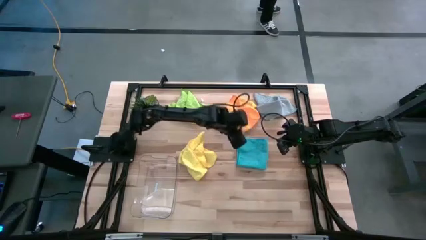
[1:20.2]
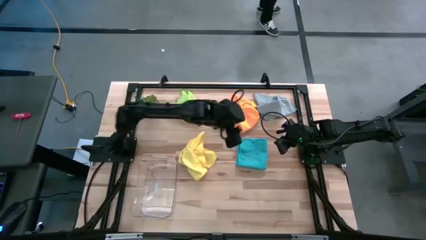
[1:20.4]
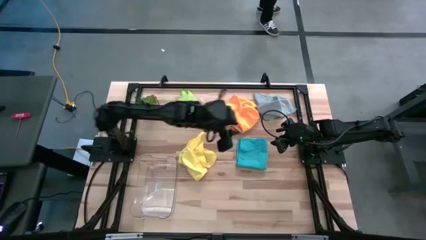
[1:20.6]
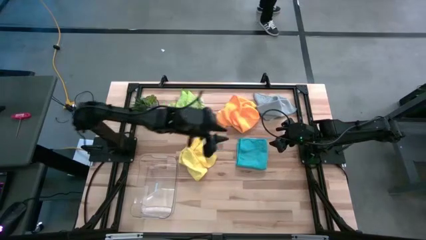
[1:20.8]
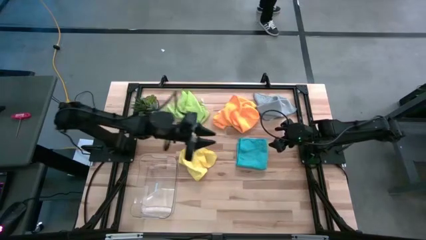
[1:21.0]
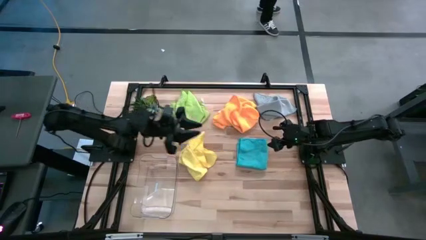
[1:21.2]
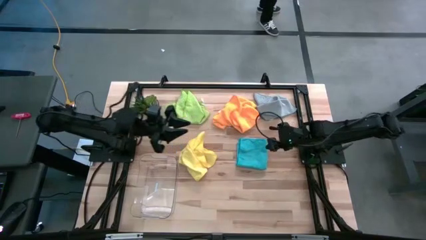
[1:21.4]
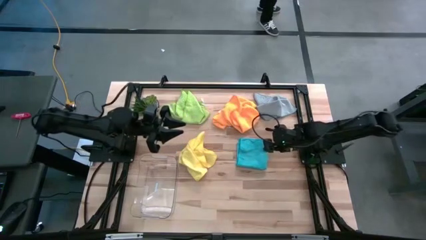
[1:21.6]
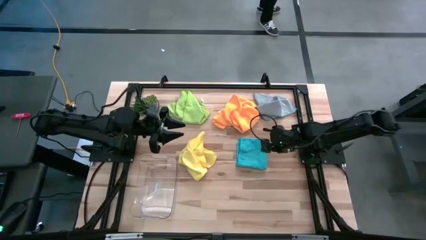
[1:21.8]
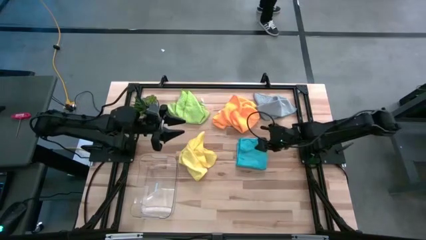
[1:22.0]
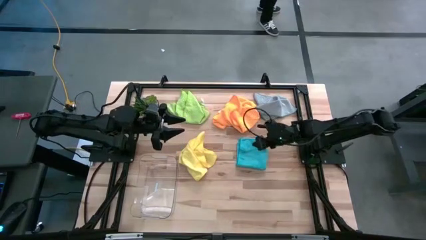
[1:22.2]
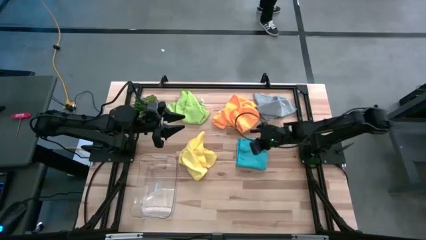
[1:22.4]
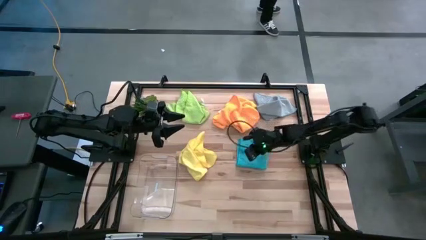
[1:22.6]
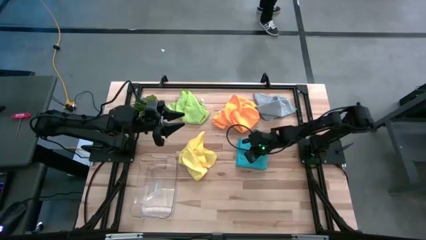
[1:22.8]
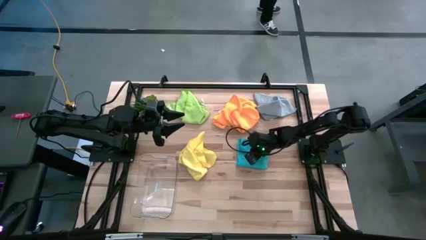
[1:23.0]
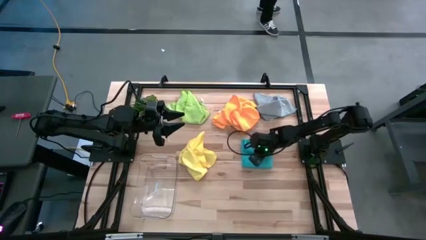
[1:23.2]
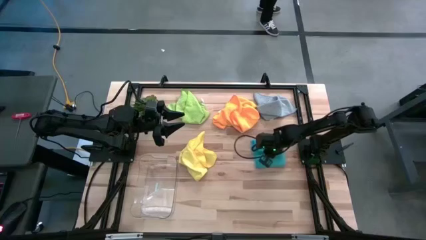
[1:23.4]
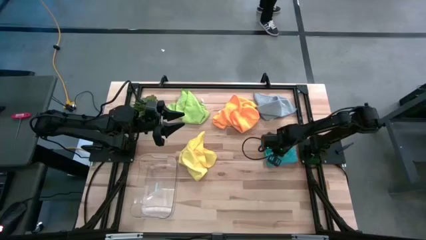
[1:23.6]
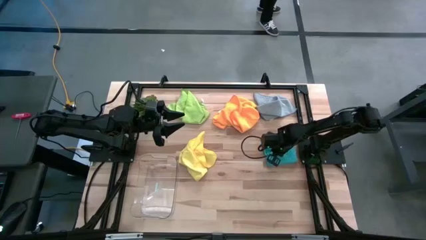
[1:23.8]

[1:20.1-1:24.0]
Task: Fold microfiber towels
Move the blue towel to the middle right of the table

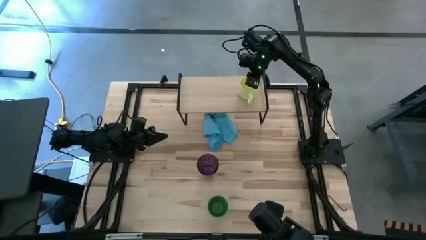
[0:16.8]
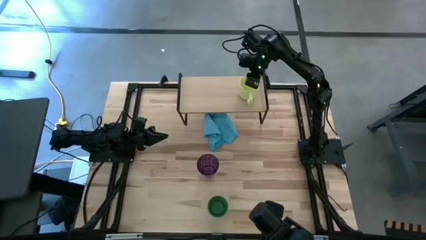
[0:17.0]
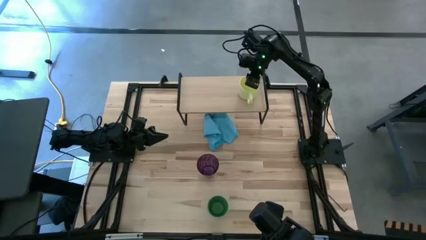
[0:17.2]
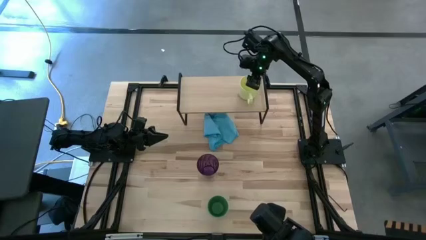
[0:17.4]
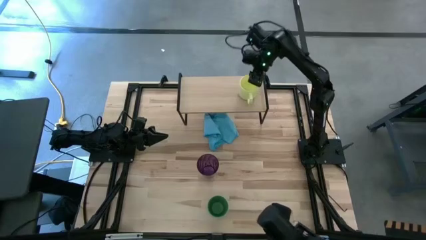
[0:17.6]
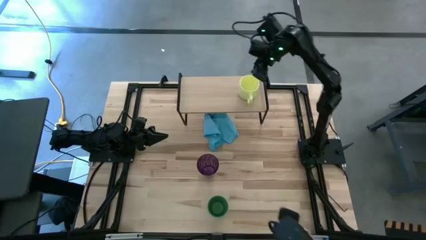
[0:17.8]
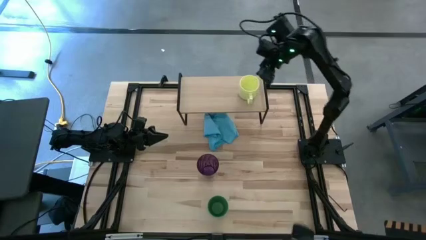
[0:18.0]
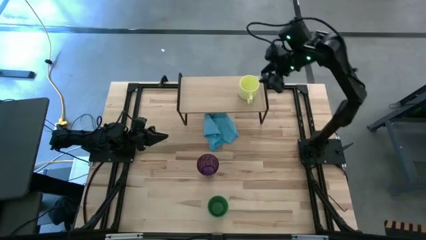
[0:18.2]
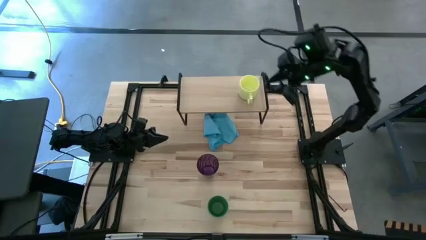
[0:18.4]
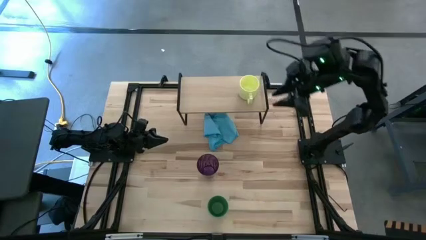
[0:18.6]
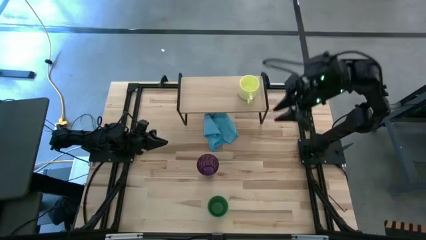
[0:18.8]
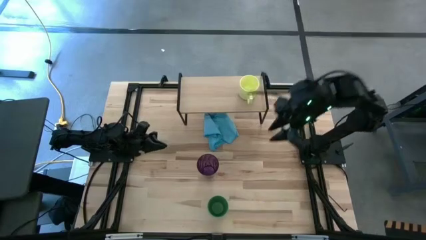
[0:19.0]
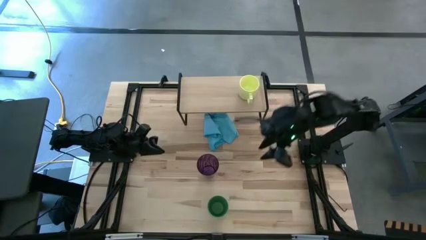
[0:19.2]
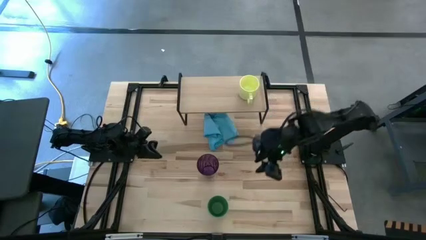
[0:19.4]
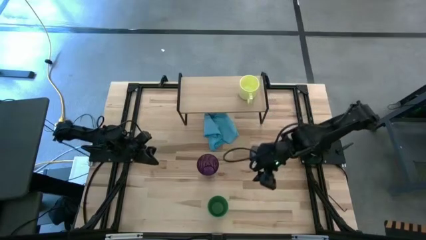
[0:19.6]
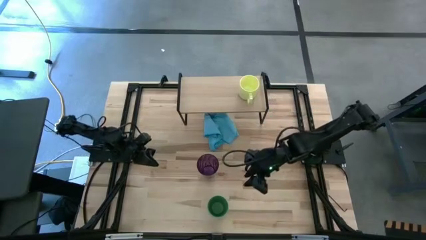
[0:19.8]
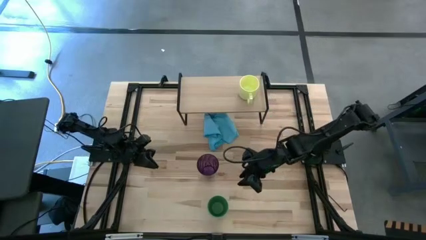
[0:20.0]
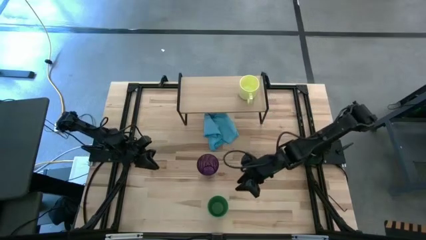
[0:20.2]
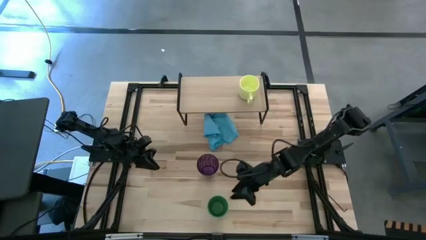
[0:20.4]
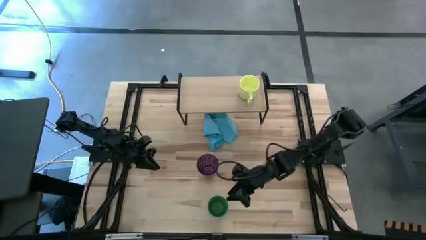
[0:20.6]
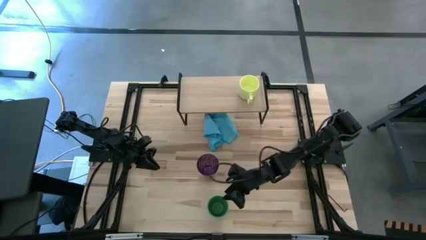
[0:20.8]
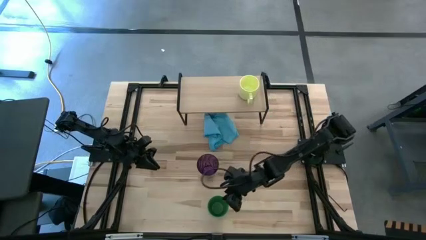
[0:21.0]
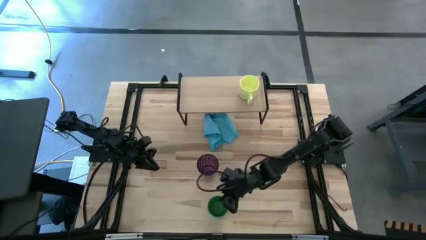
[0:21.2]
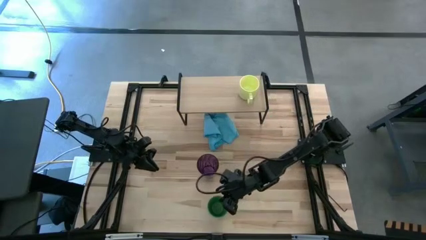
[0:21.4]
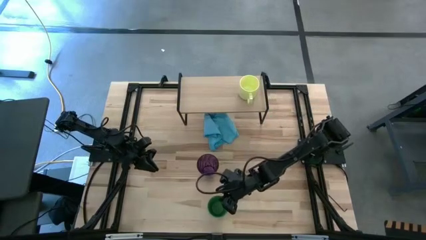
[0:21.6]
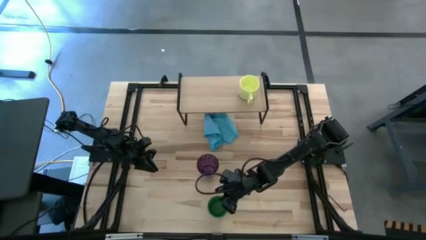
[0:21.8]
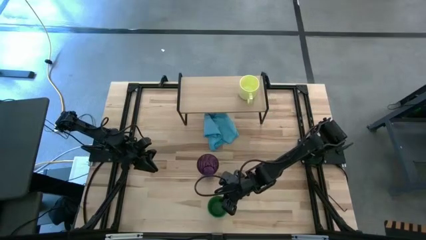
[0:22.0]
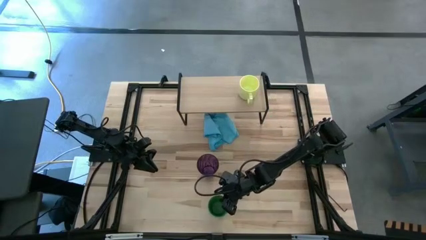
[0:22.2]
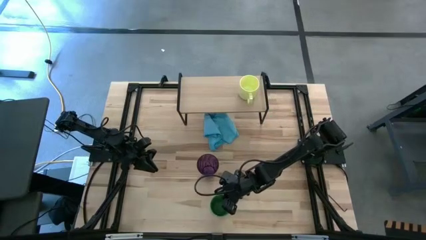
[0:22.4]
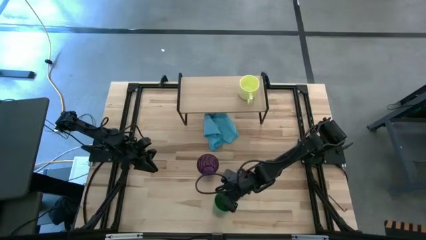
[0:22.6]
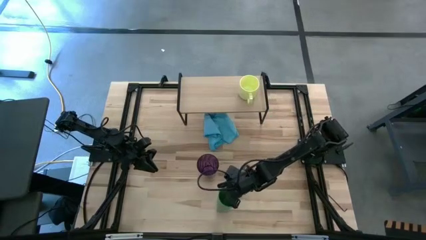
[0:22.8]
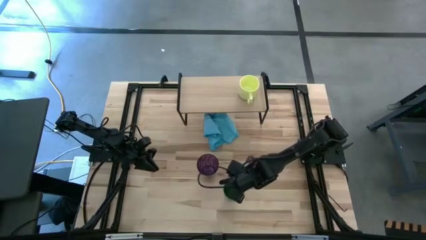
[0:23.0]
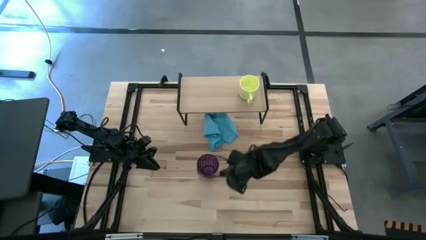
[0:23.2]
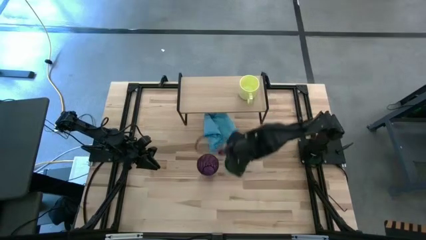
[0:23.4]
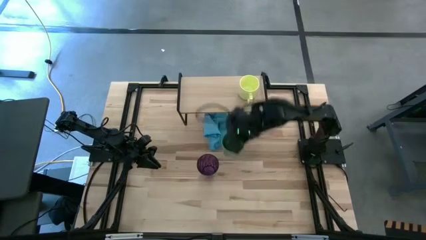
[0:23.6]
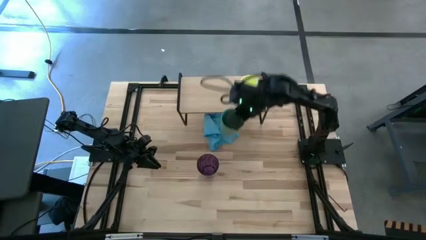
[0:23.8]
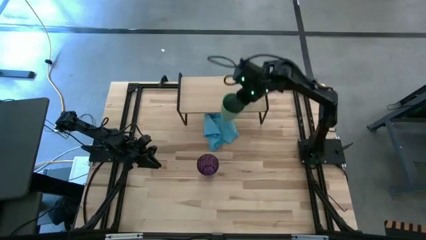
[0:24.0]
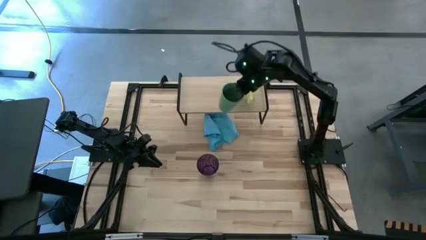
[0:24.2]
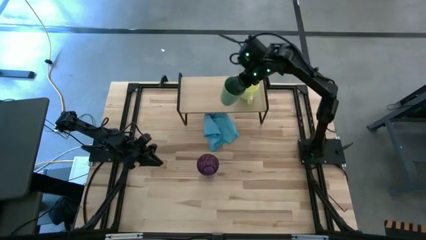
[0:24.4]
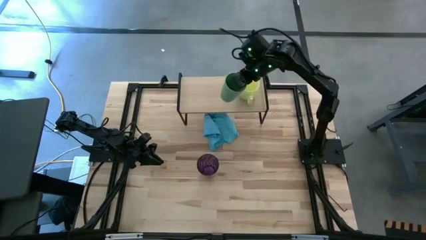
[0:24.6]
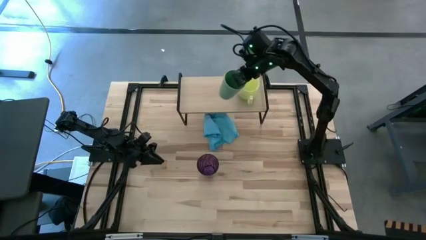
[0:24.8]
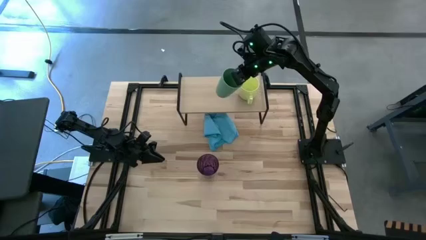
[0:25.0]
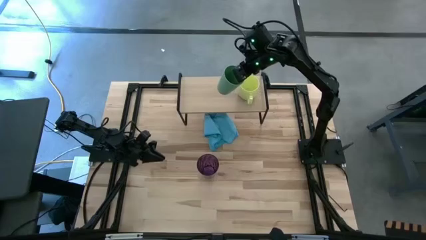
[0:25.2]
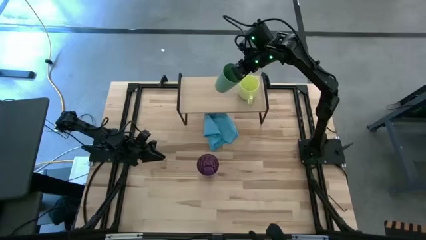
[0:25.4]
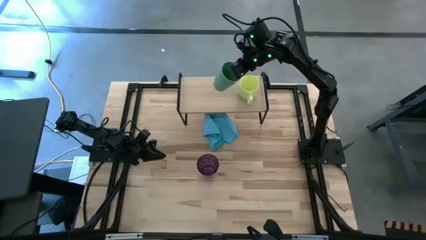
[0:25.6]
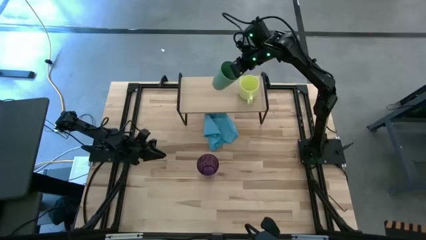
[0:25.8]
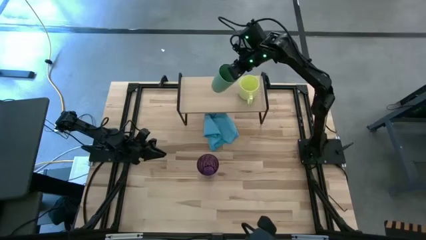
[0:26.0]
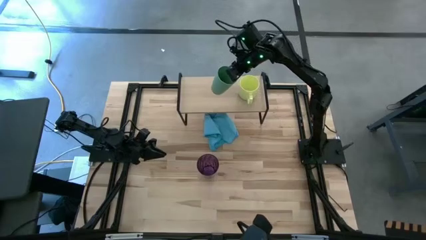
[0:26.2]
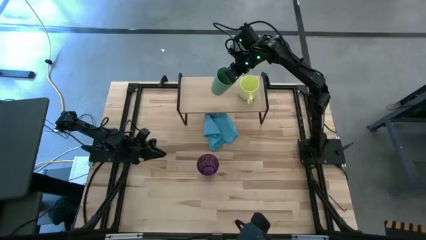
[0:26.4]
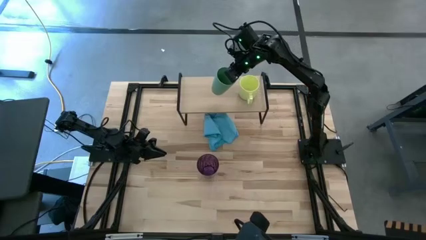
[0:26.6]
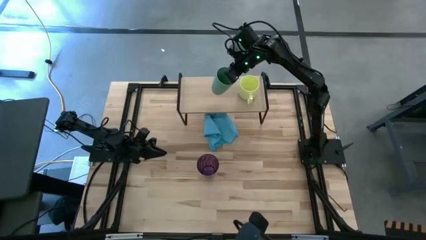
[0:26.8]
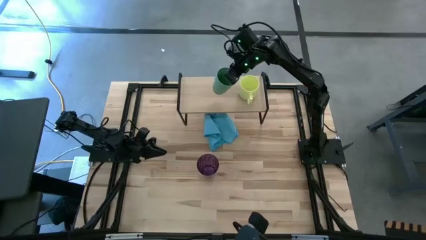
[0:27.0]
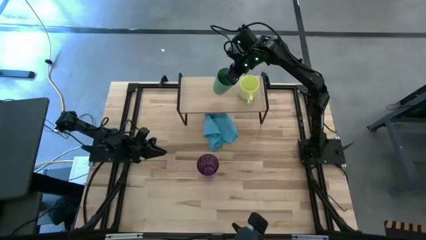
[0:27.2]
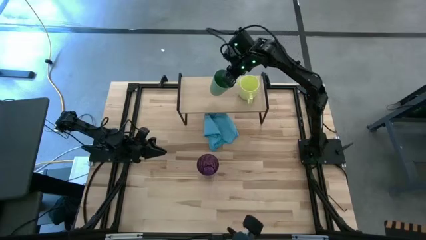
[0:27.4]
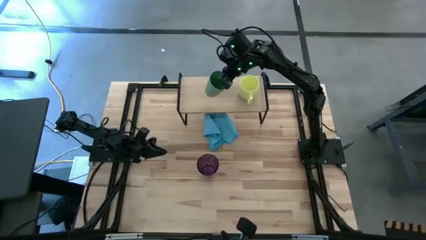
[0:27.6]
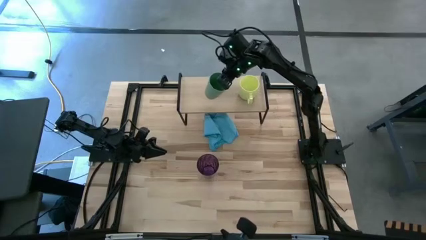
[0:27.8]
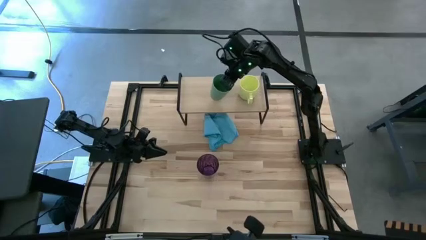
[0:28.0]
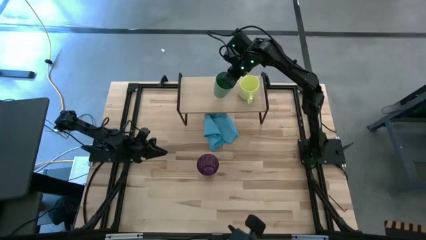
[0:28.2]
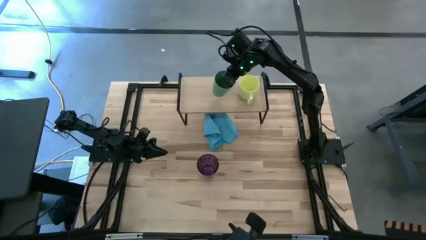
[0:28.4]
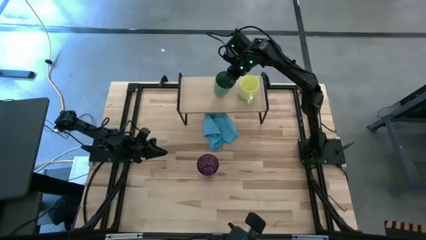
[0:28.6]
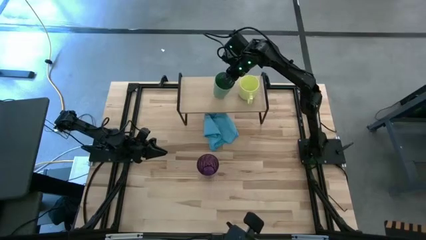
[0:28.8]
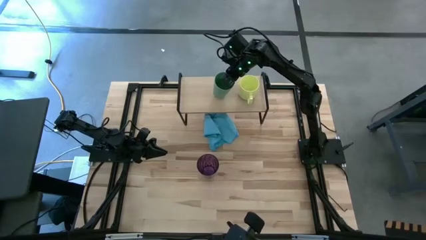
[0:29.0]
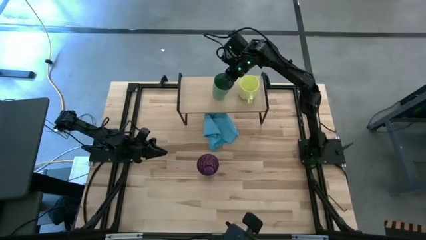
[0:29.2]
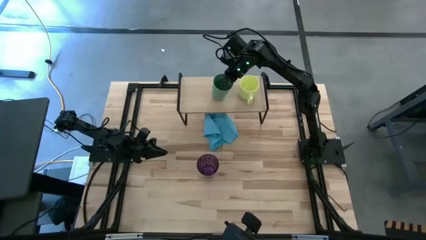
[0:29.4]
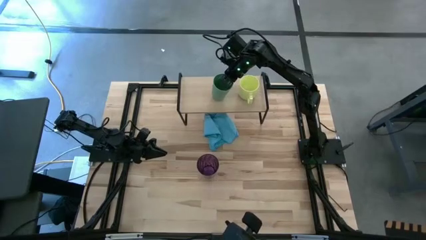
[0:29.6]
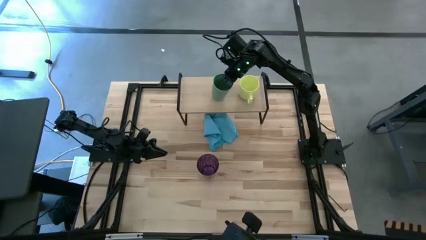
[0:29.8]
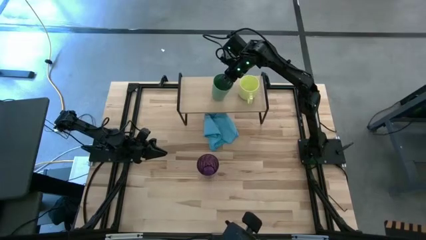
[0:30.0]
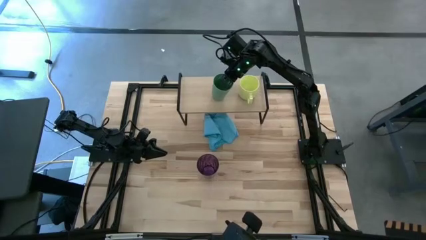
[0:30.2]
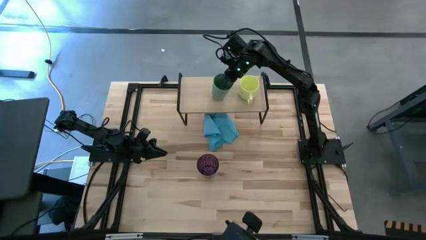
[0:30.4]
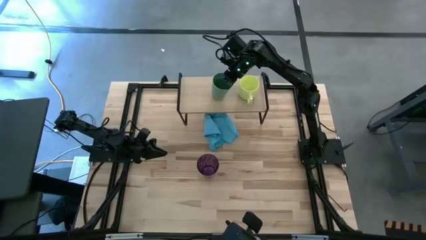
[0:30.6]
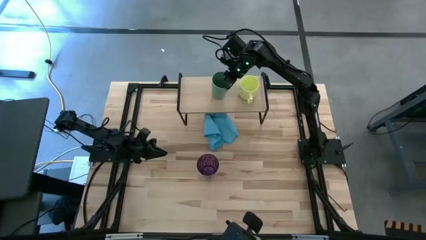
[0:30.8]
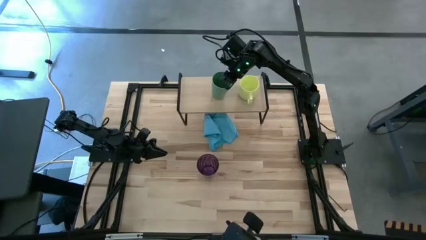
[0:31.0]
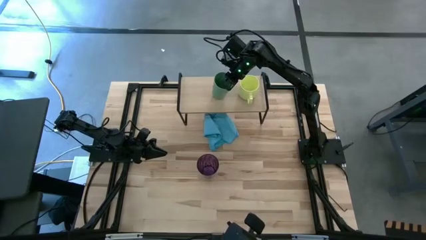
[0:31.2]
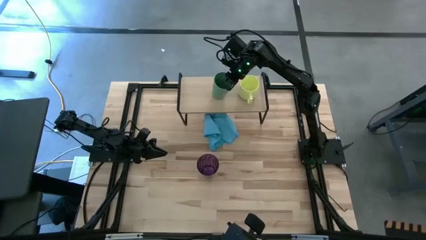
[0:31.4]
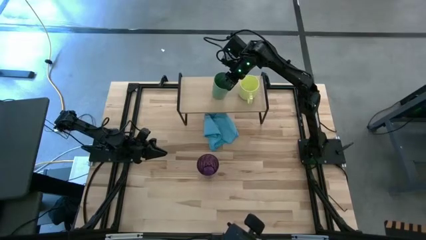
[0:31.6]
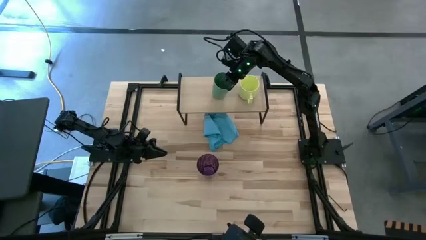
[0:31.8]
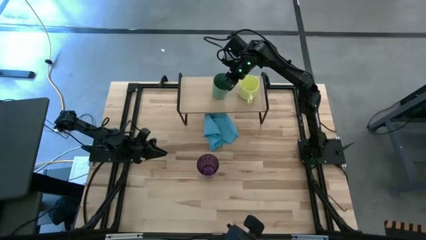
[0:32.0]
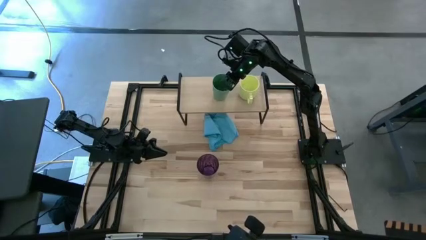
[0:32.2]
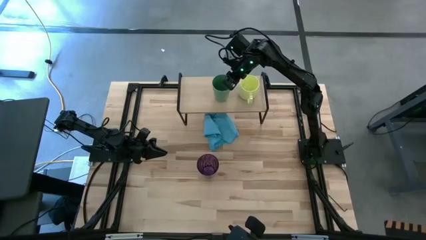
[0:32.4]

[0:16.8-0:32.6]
Task: Stack small to large cups/mugs on shelf
Put the green cup on the shelf
